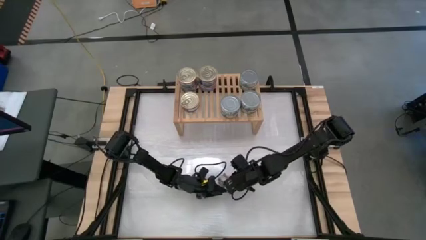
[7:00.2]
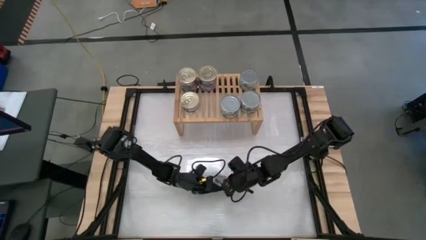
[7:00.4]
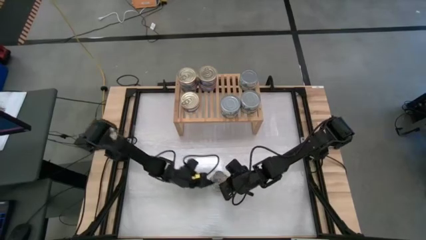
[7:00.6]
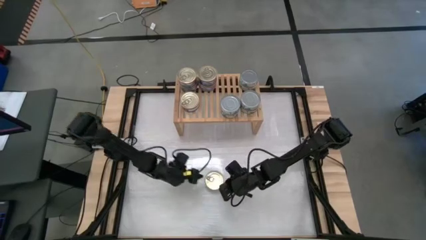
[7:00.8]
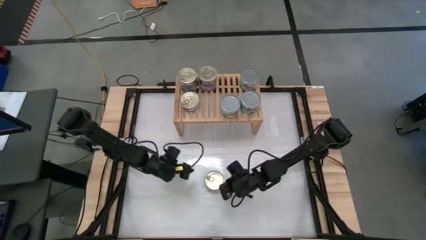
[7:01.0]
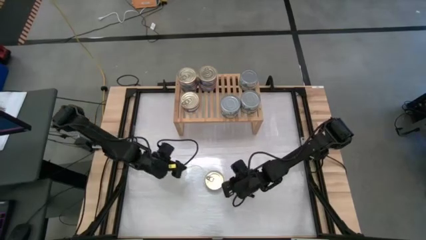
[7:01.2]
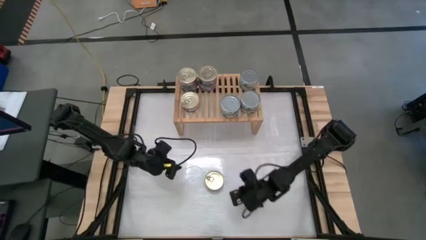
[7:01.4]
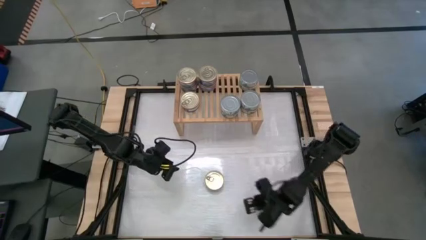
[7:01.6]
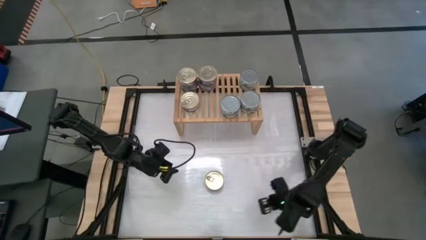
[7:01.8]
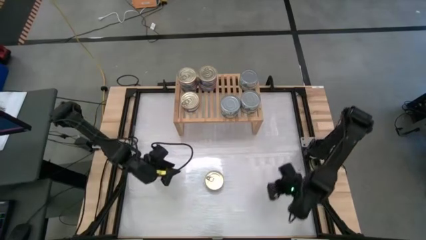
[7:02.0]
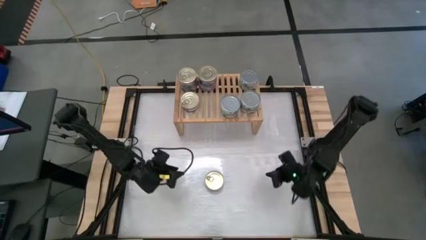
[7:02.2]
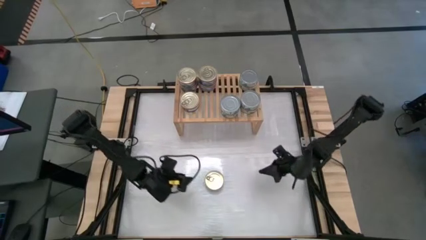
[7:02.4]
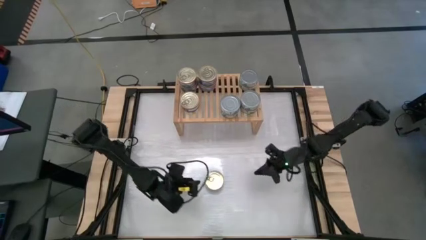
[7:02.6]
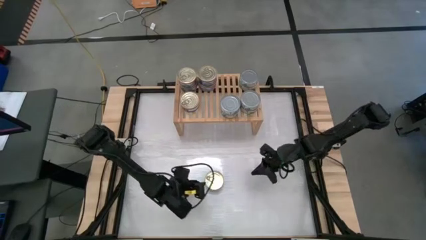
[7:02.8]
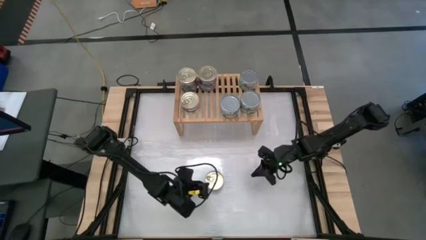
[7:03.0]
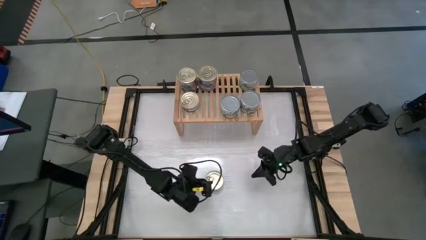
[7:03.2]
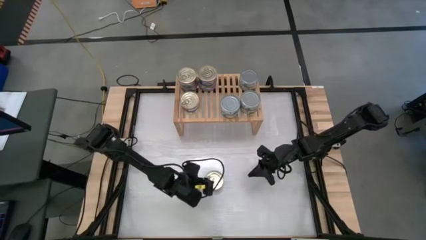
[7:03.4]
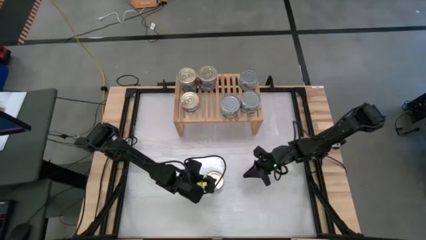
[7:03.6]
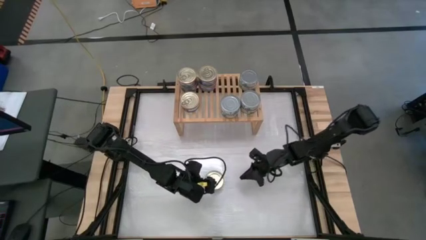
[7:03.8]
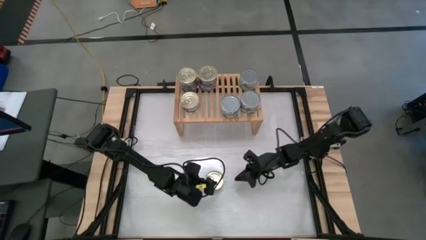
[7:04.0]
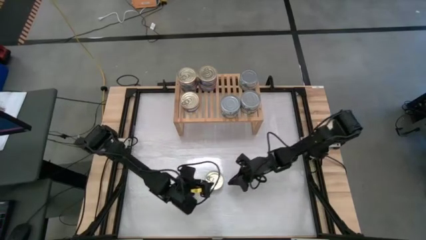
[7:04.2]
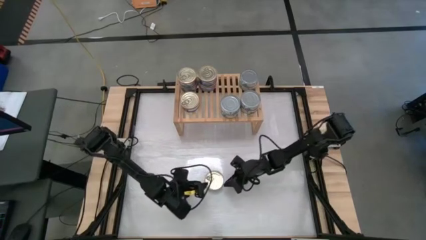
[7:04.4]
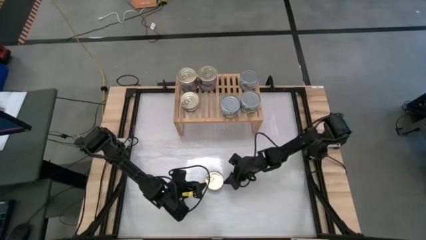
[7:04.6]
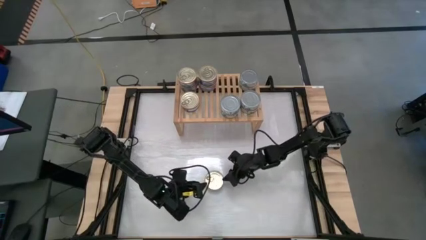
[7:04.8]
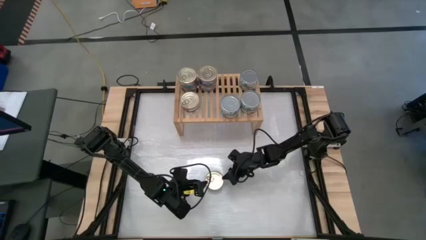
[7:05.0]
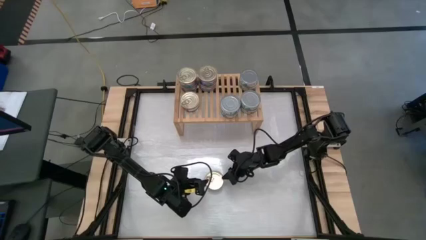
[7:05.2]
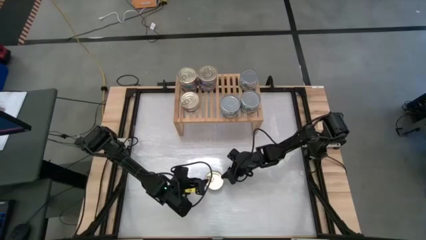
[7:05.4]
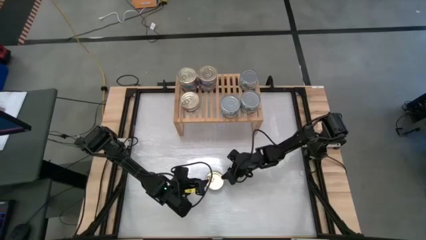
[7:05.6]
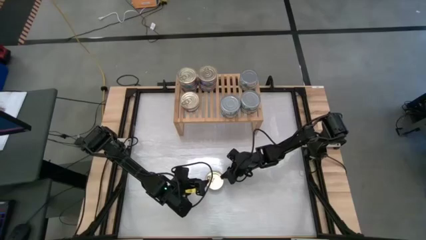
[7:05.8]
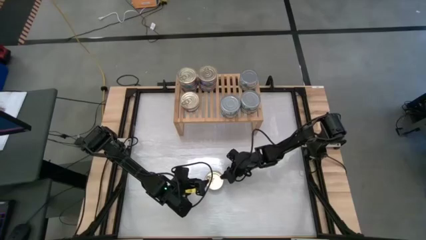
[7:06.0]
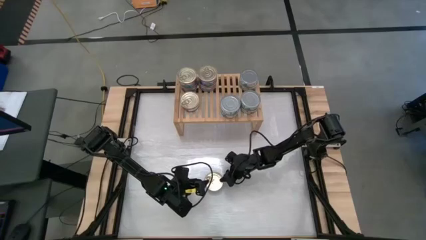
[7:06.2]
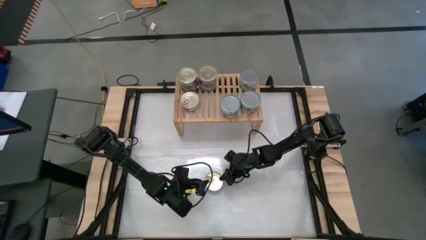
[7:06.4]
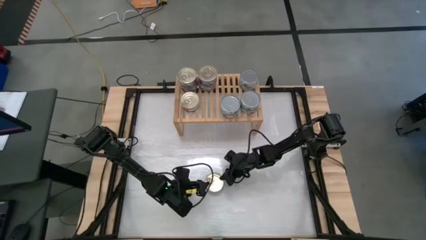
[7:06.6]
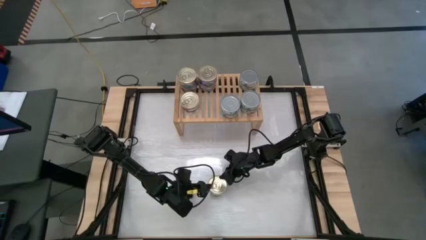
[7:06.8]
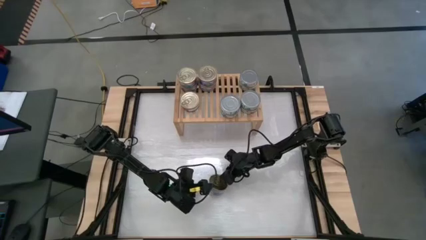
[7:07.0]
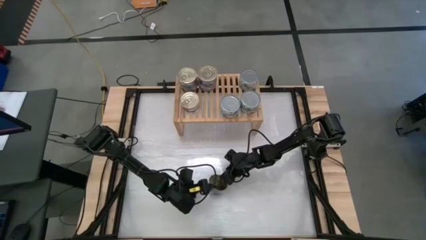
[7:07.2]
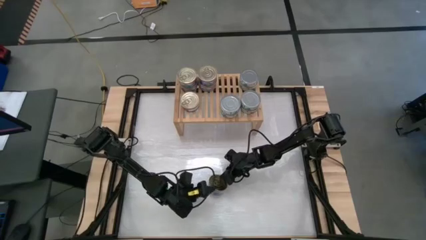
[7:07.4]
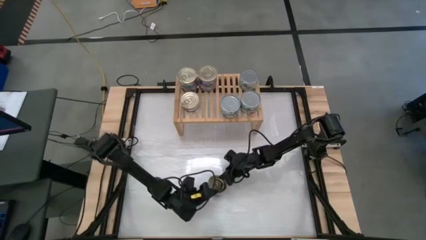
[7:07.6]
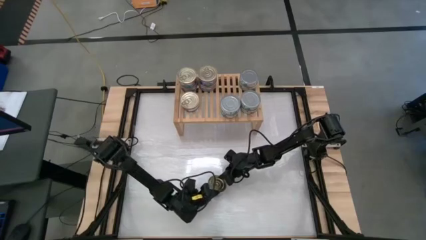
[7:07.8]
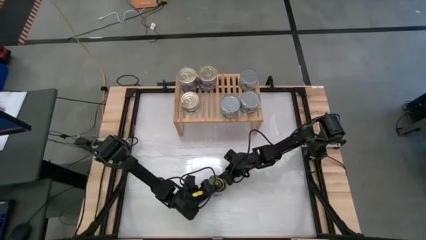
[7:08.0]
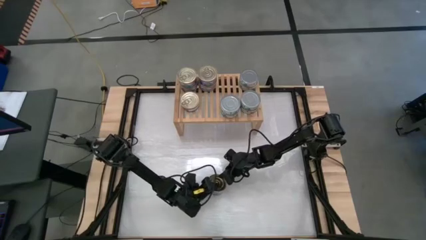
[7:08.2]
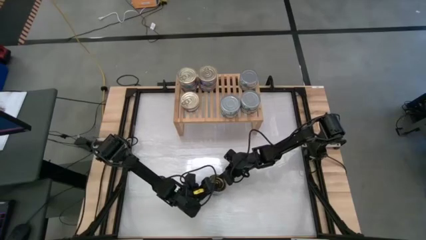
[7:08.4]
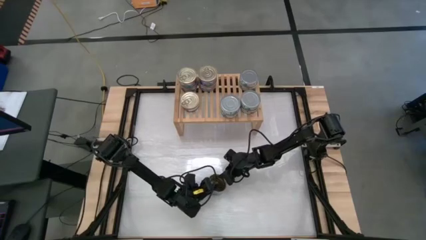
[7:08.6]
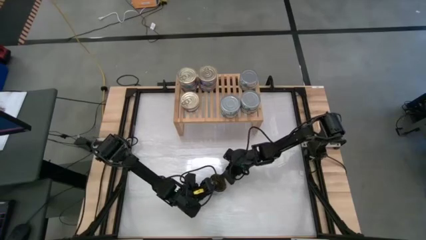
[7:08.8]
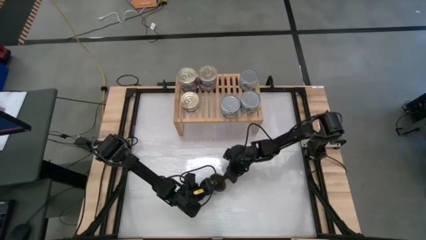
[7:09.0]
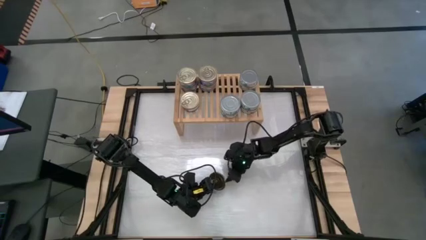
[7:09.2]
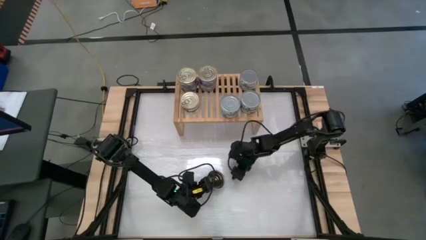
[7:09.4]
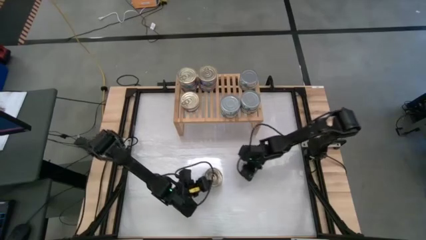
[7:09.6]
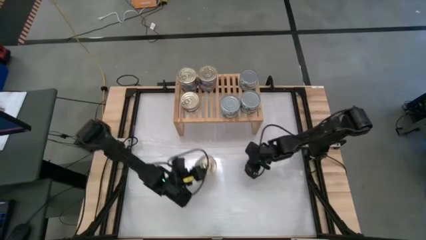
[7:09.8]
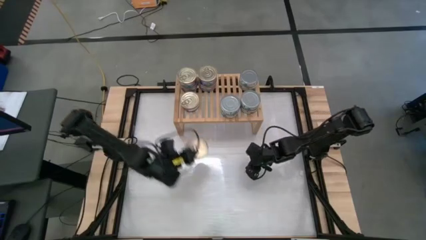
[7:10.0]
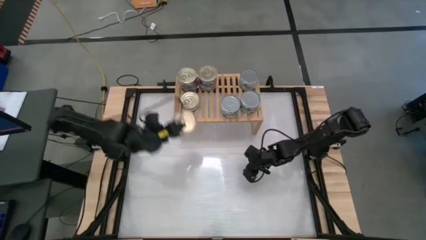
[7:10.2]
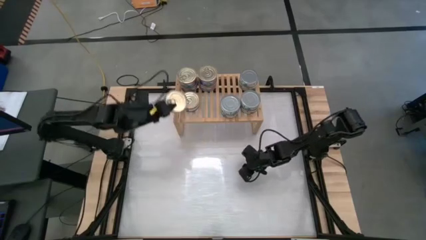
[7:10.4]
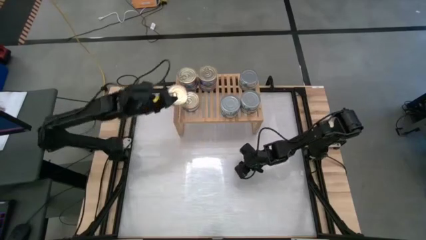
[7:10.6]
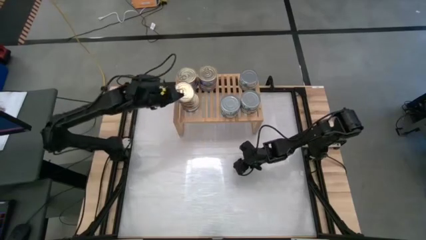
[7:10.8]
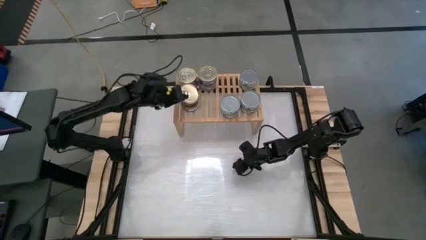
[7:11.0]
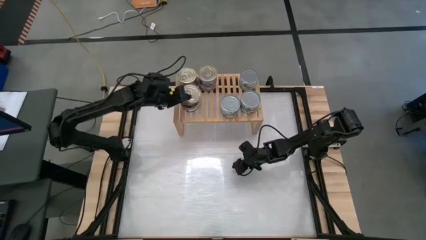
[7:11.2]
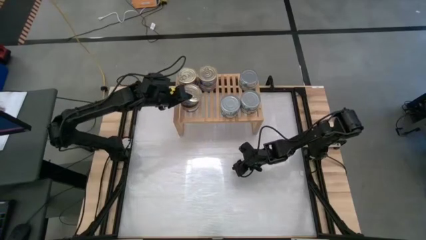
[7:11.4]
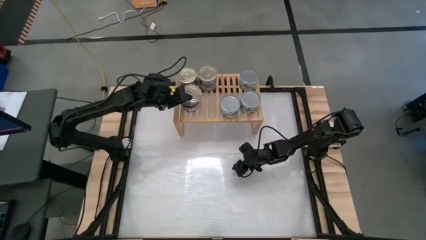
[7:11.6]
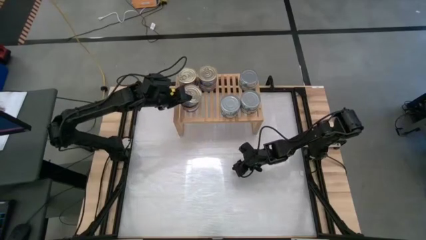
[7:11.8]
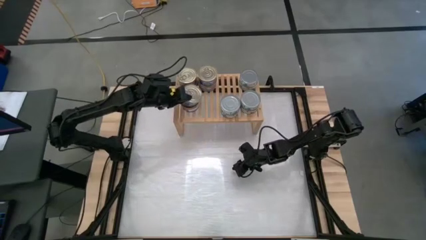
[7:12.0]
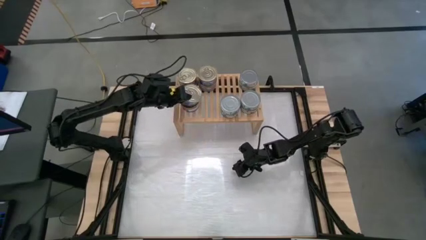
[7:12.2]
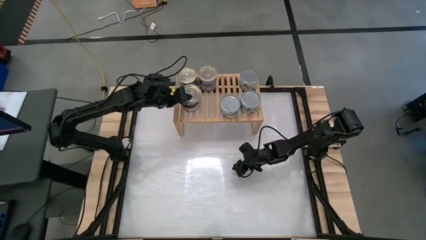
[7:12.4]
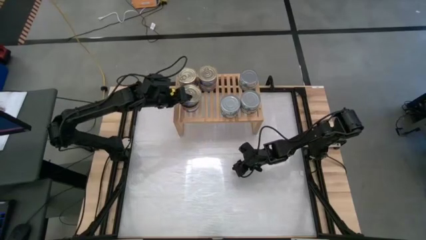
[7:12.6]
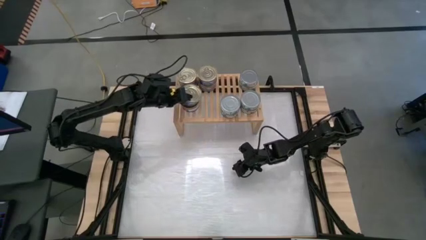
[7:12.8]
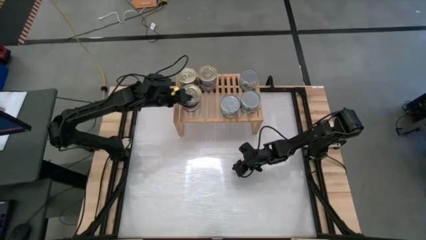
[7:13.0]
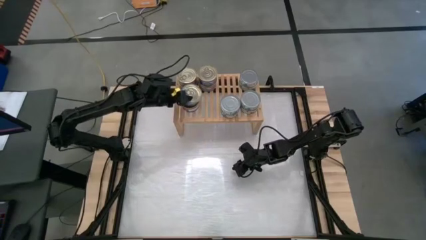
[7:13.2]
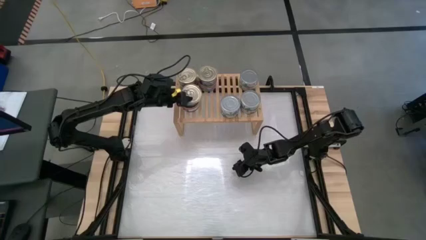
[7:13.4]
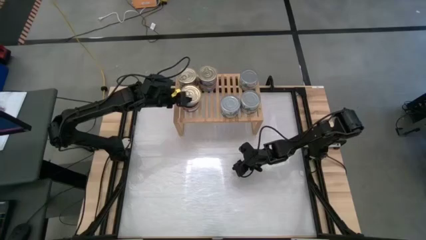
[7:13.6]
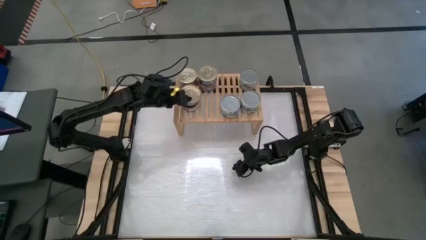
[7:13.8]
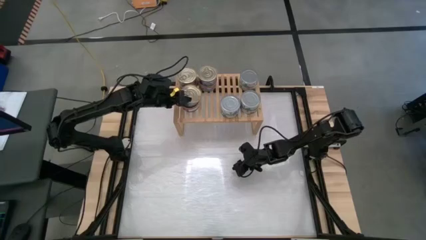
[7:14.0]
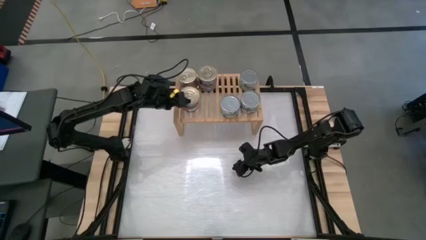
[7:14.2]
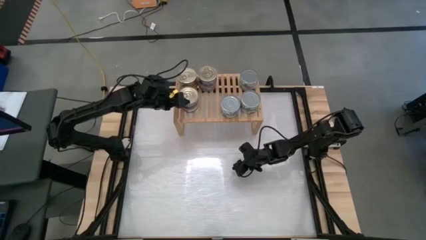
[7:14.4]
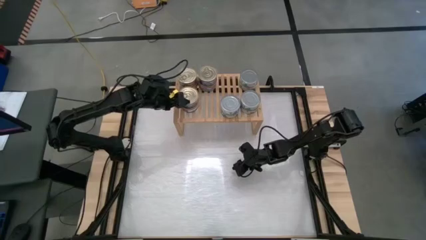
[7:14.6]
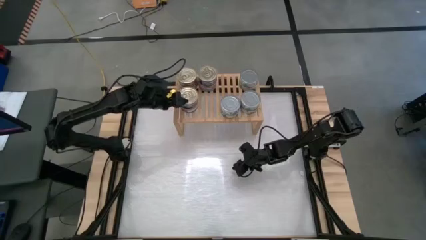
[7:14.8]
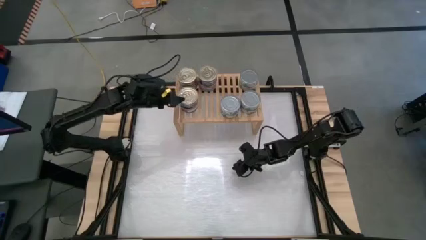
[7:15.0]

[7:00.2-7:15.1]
Task: Stack canned seafood by type on shelf
Stack the blue-pink tuna can on top of the other blue-pink tuna can
